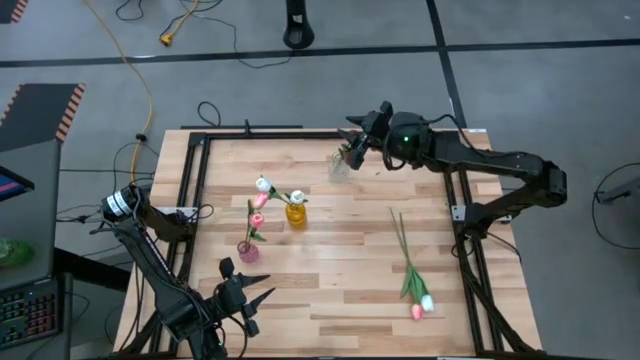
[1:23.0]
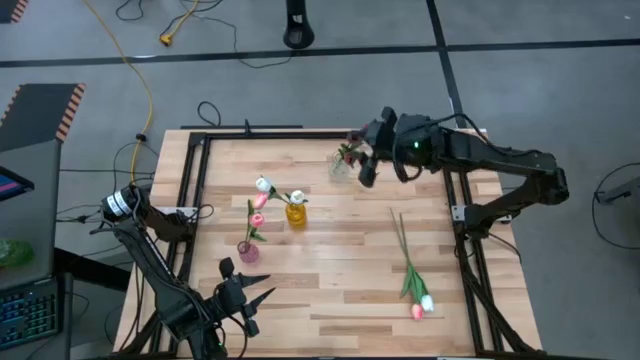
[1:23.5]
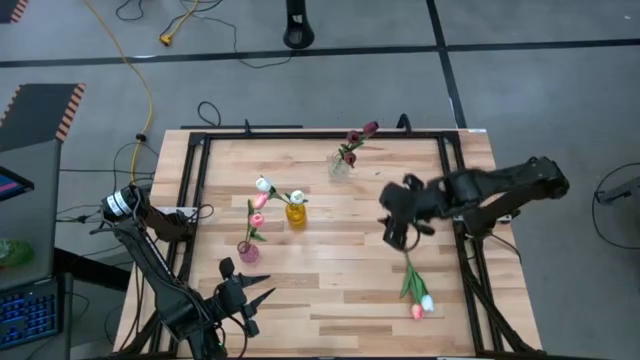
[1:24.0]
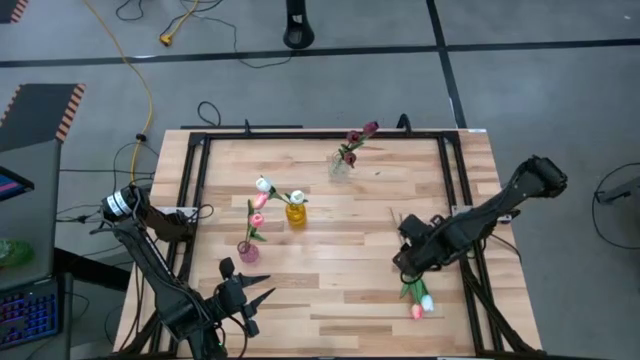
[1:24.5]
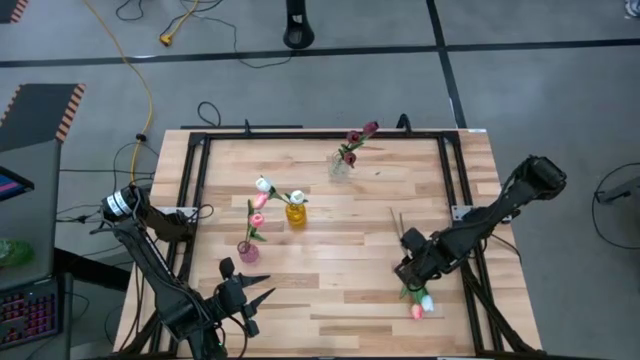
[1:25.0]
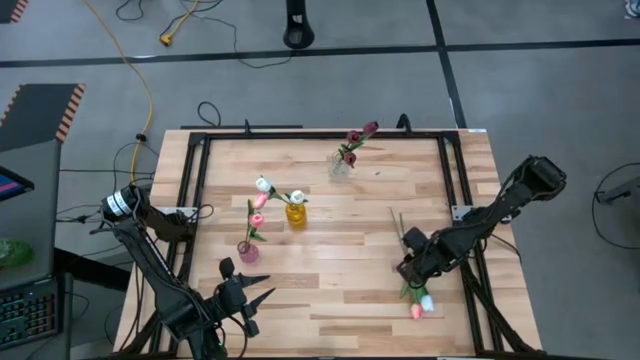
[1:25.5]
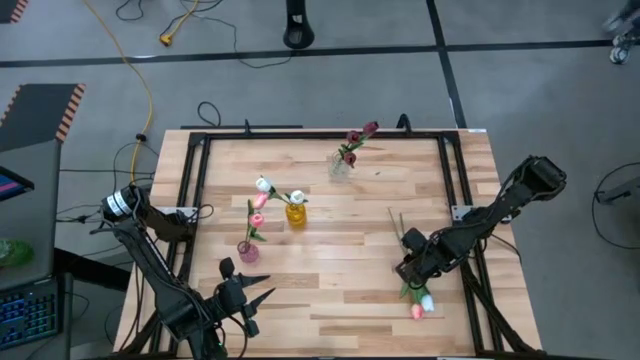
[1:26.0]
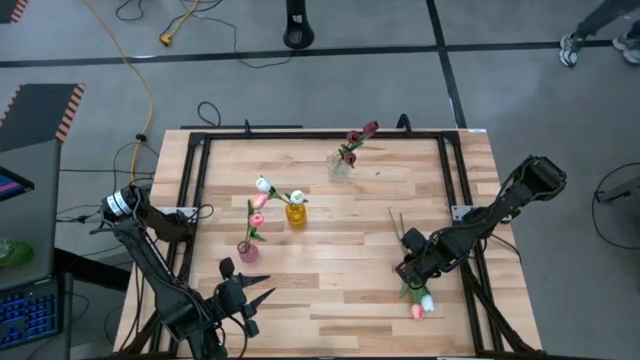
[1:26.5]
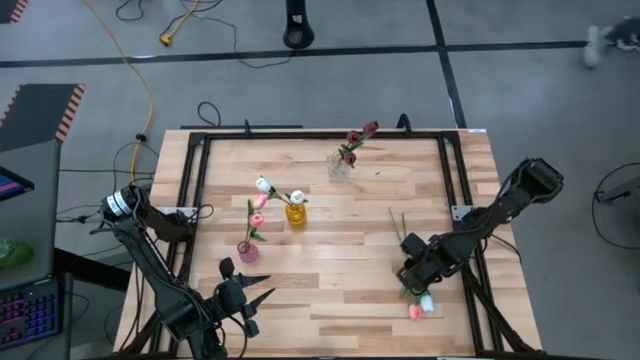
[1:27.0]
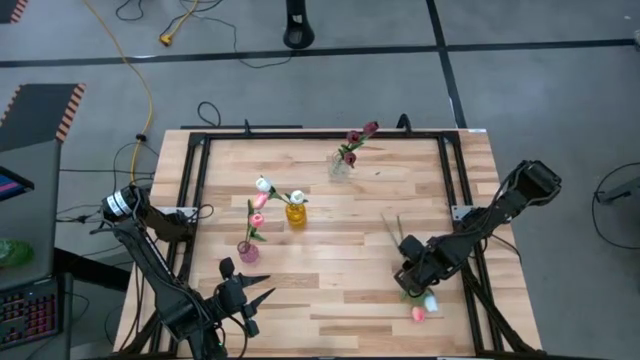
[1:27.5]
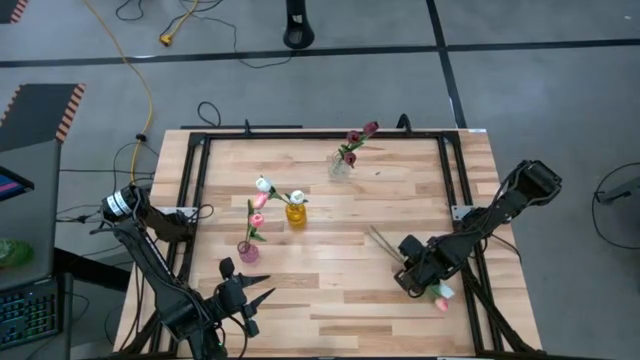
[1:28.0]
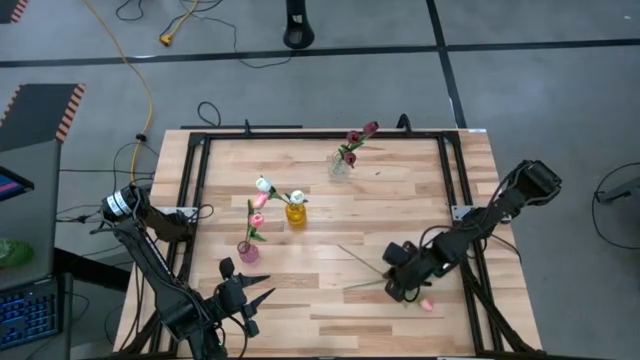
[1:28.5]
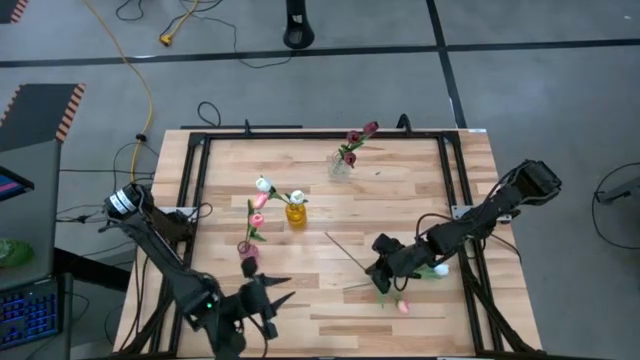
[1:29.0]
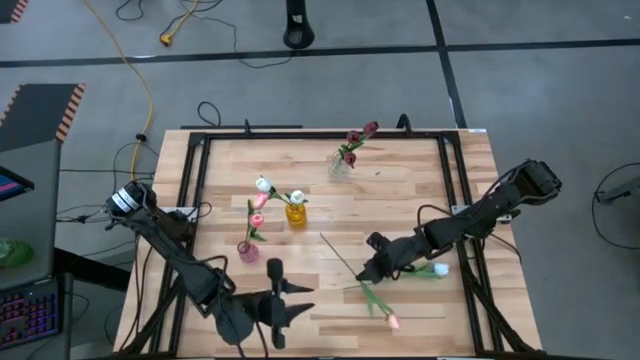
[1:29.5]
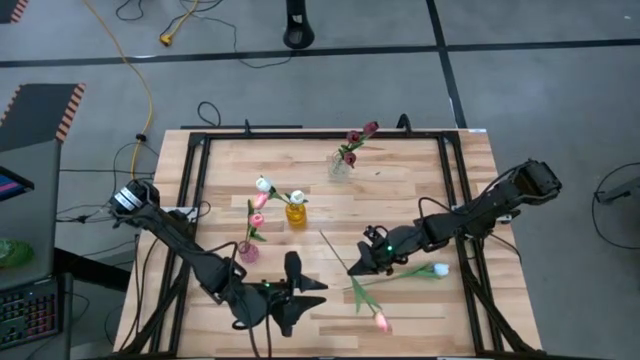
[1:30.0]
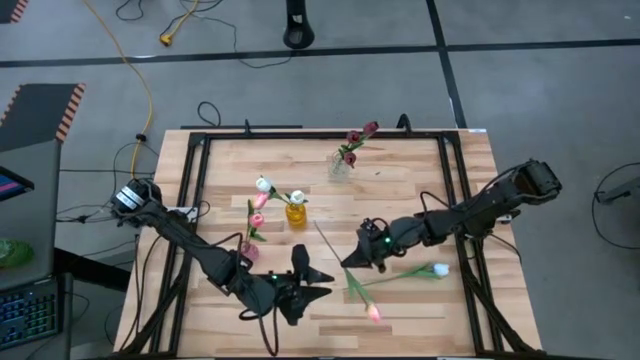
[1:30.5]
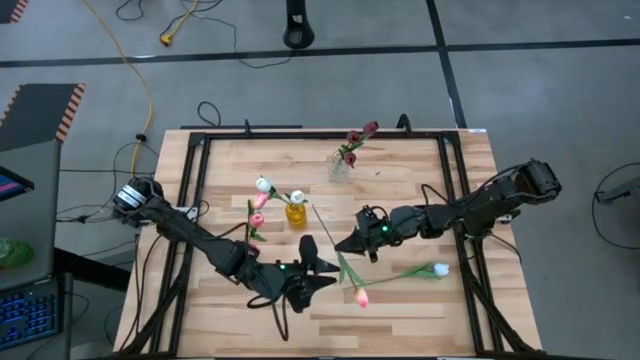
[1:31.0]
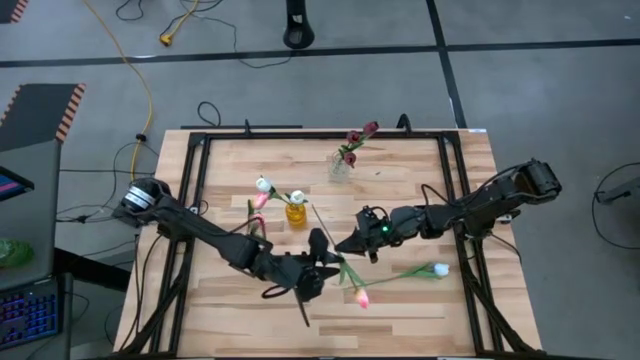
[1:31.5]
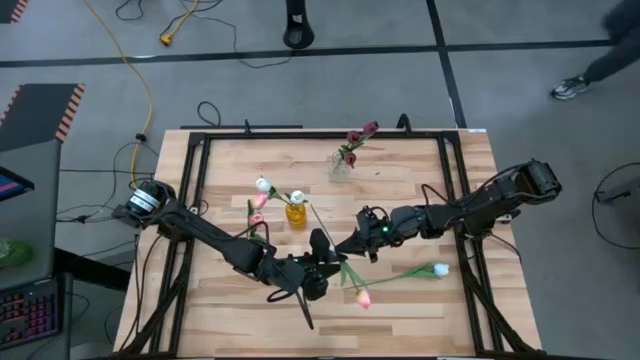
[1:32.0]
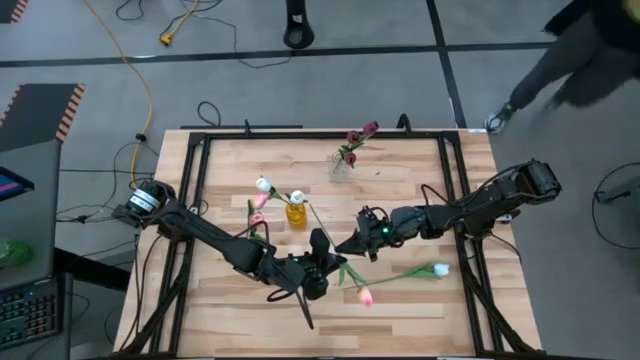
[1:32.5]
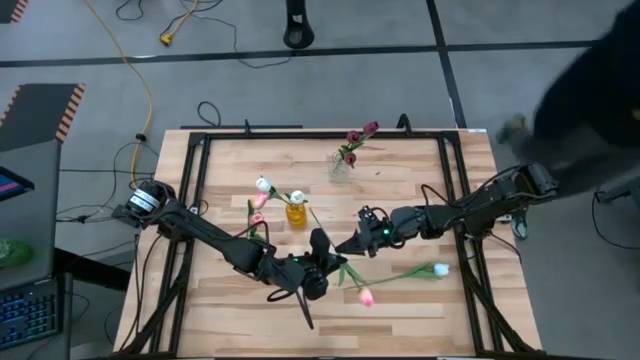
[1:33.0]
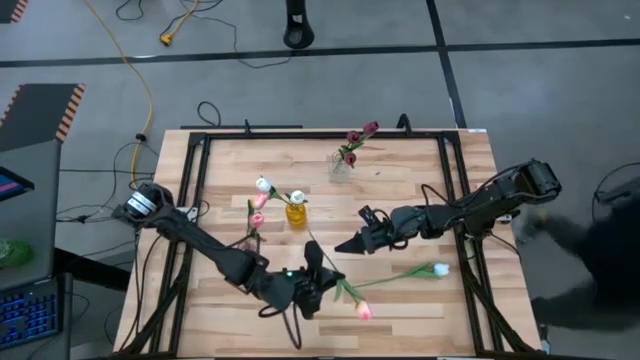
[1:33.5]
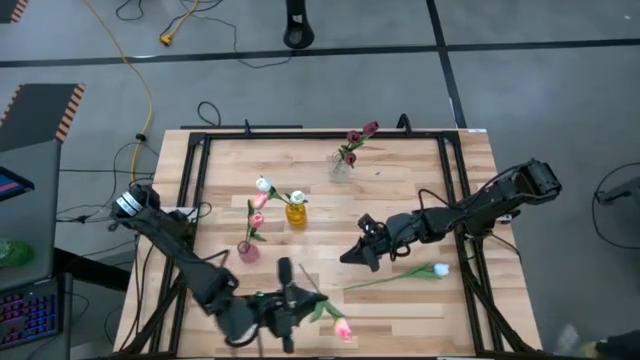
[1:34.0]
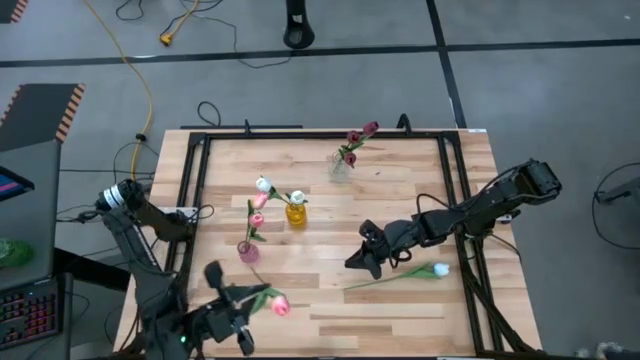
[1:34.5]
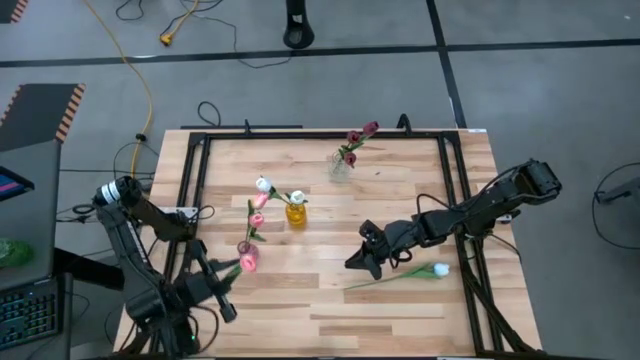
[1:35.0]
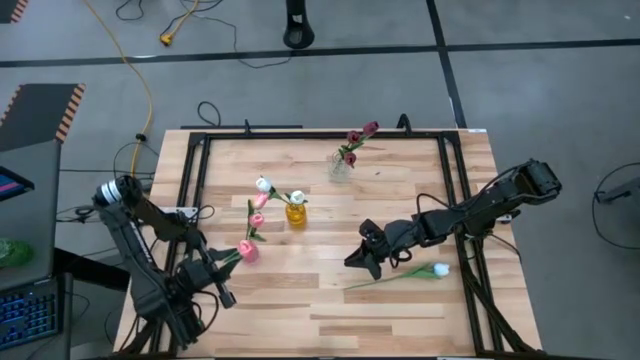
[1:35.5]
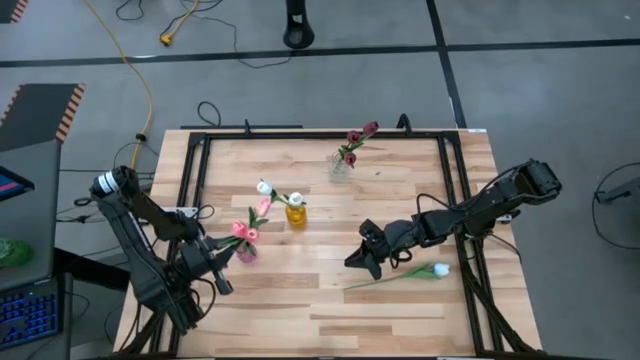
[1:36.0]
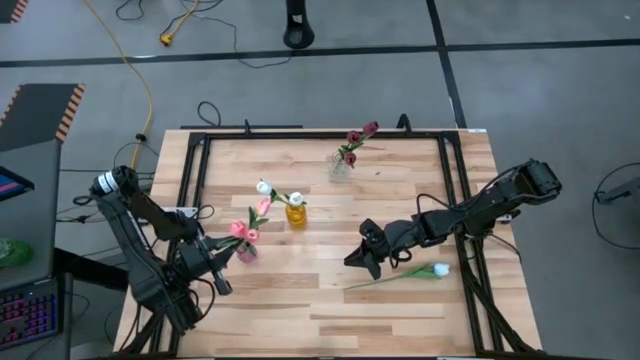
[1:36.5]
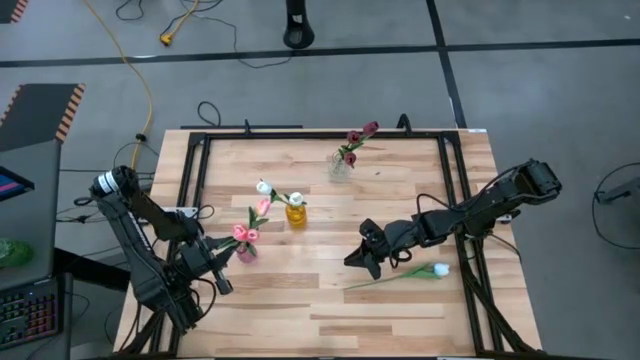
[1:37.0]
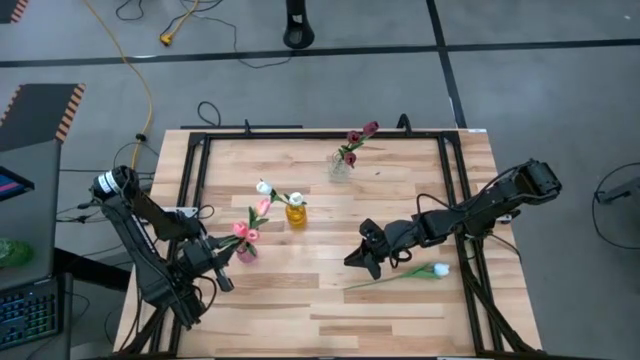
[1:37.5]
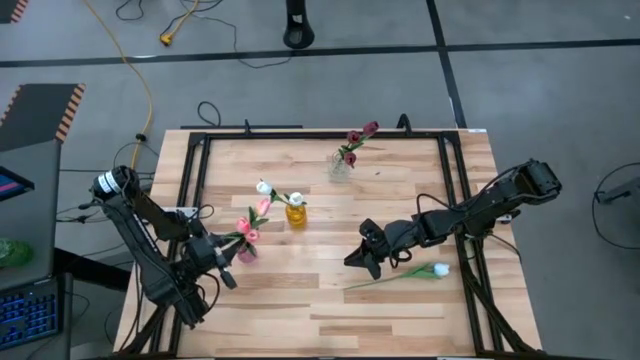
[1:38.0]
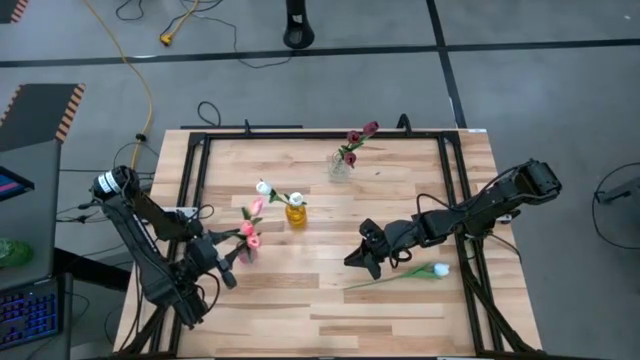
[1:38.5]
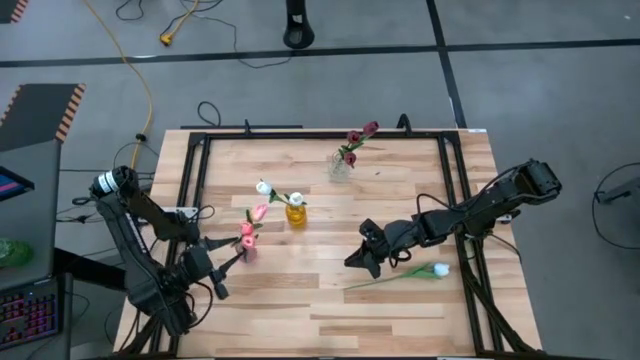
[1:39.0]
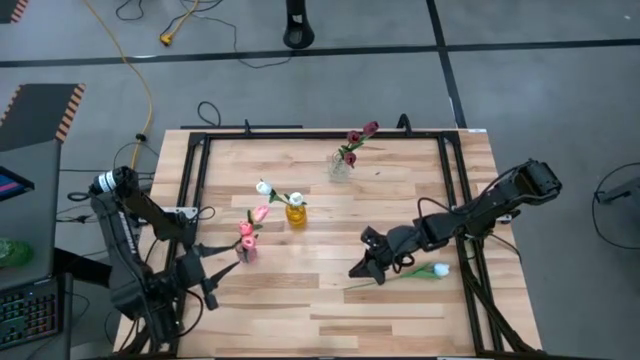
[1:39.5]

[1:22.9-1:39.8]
Task: Sort flowers into vase by color
Put the pink flower into the purple vase
